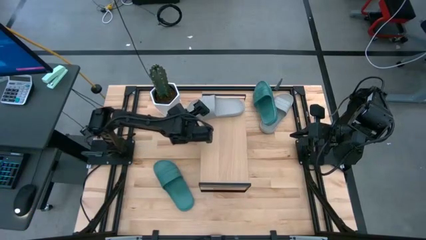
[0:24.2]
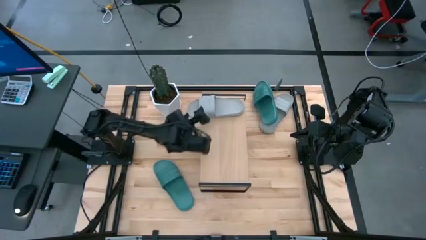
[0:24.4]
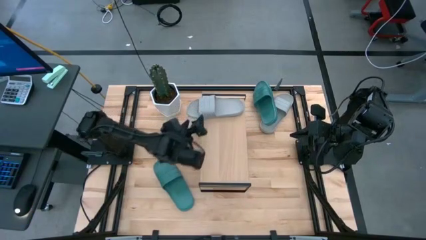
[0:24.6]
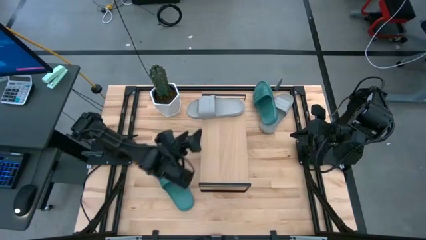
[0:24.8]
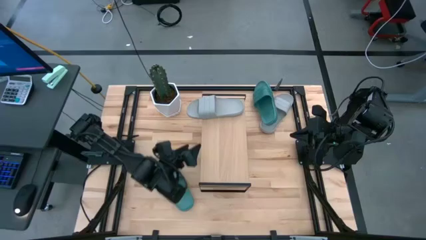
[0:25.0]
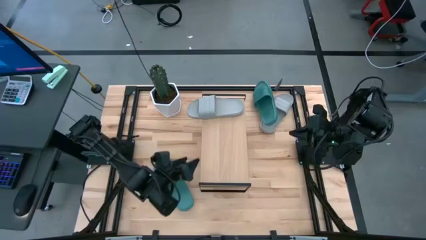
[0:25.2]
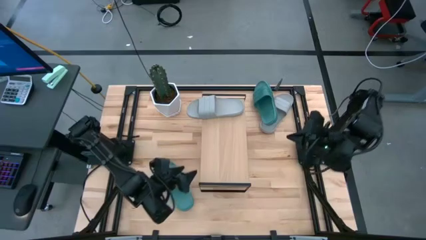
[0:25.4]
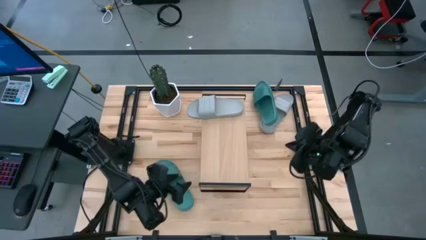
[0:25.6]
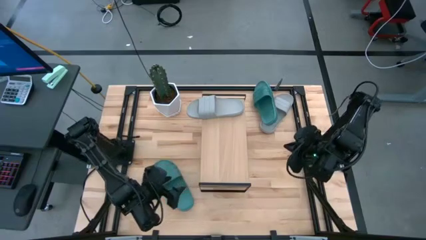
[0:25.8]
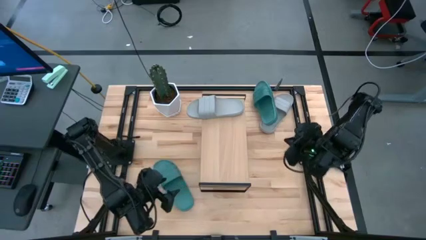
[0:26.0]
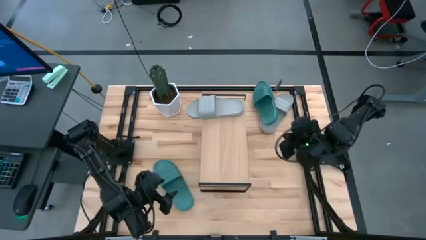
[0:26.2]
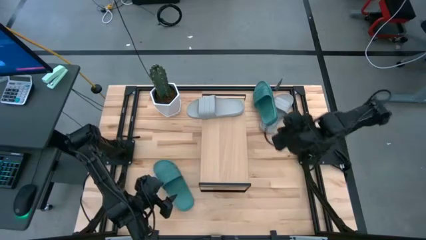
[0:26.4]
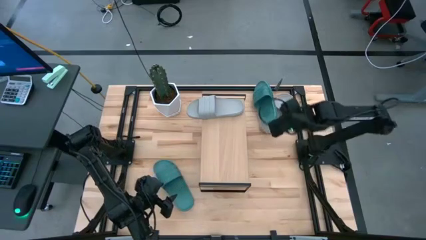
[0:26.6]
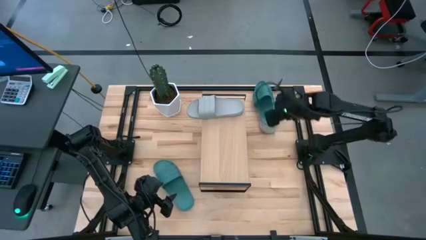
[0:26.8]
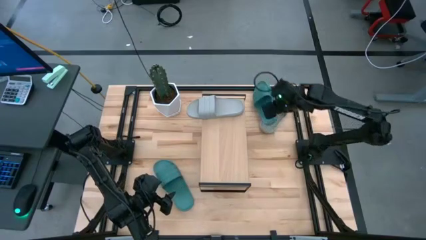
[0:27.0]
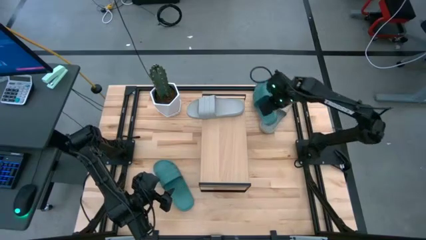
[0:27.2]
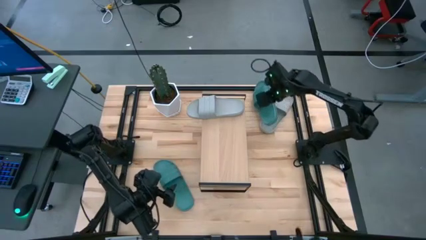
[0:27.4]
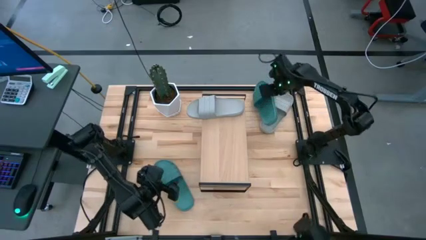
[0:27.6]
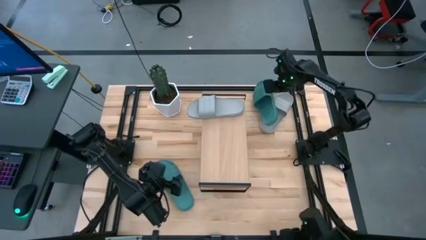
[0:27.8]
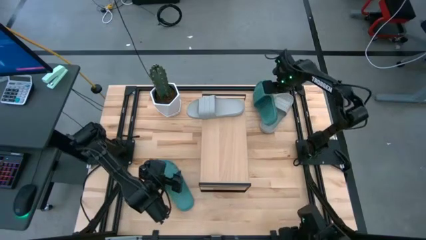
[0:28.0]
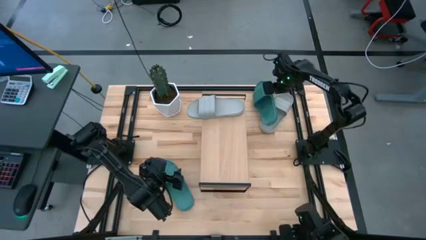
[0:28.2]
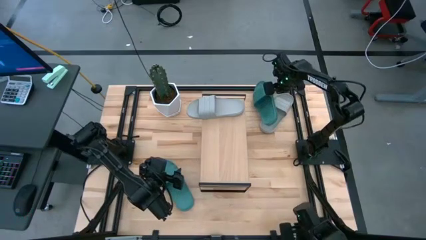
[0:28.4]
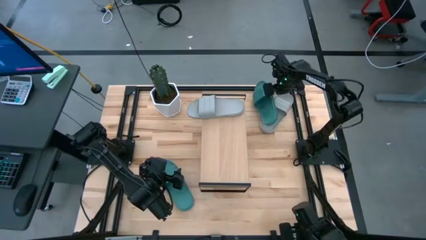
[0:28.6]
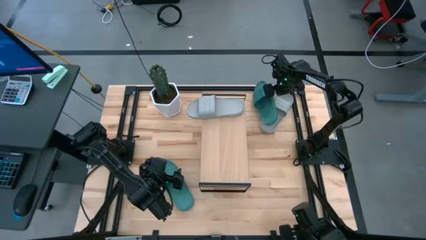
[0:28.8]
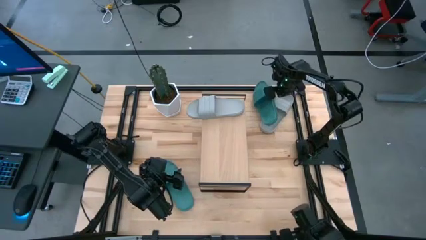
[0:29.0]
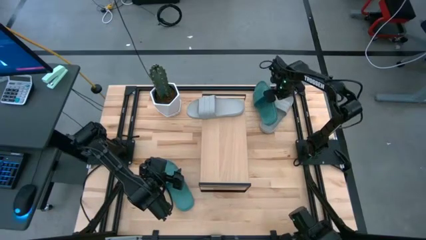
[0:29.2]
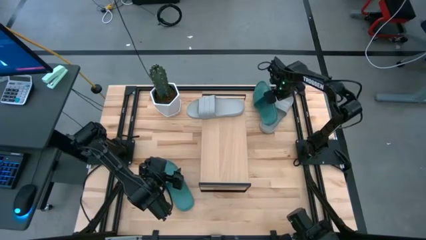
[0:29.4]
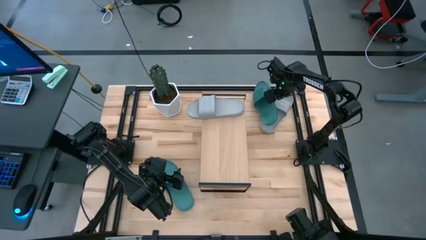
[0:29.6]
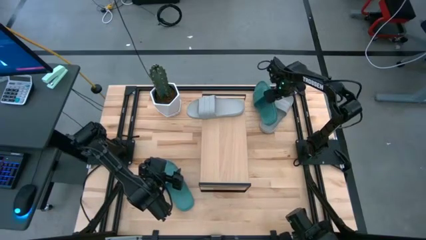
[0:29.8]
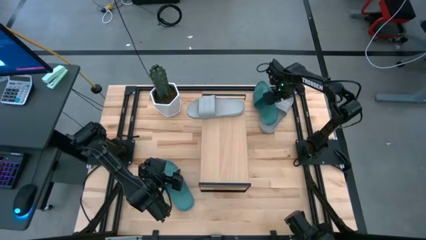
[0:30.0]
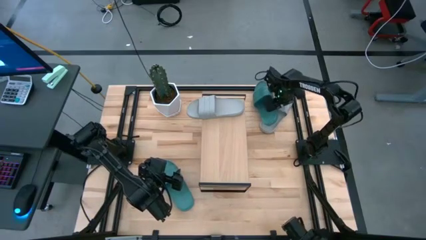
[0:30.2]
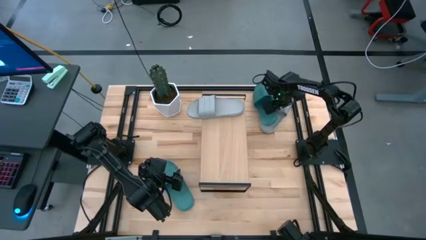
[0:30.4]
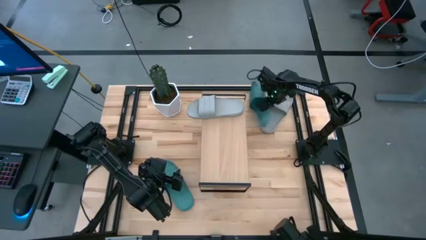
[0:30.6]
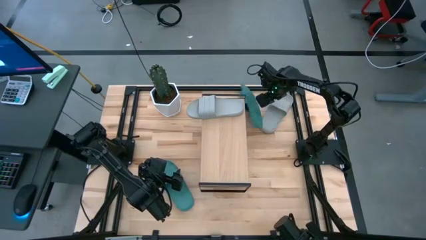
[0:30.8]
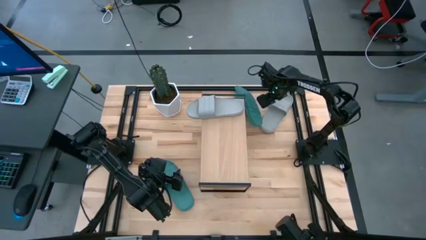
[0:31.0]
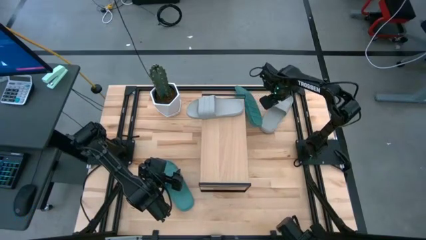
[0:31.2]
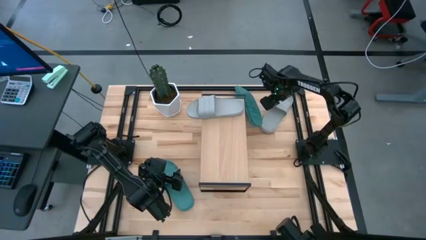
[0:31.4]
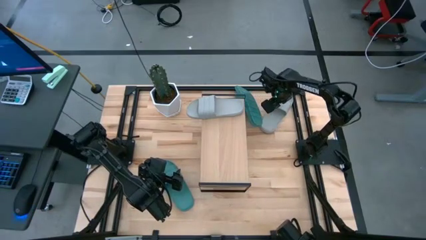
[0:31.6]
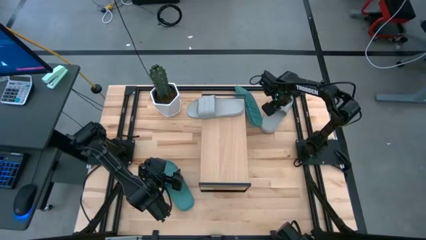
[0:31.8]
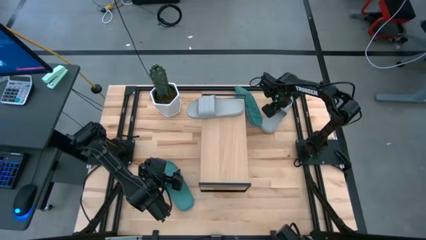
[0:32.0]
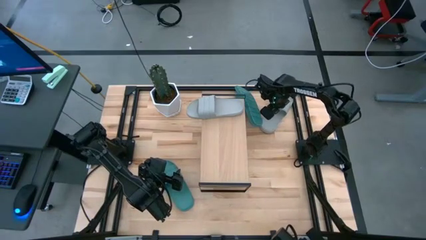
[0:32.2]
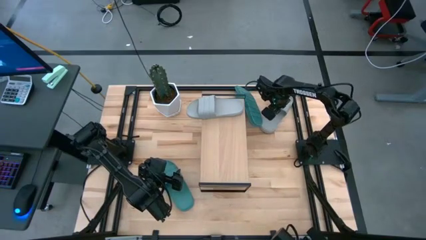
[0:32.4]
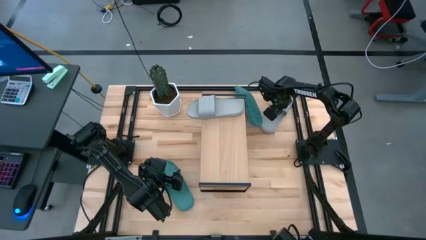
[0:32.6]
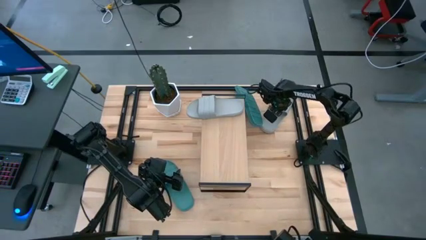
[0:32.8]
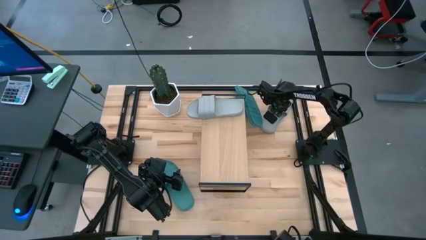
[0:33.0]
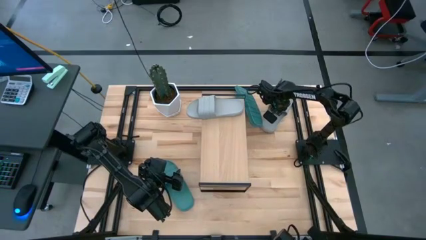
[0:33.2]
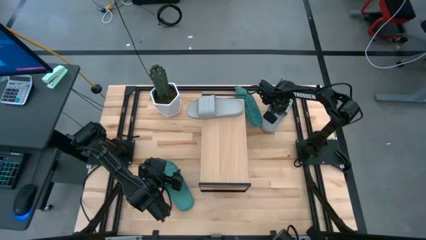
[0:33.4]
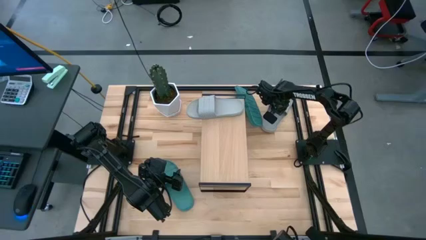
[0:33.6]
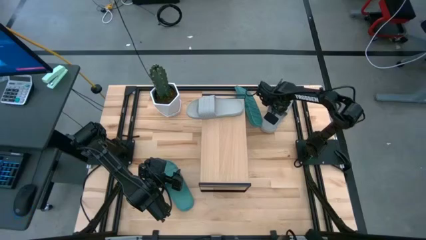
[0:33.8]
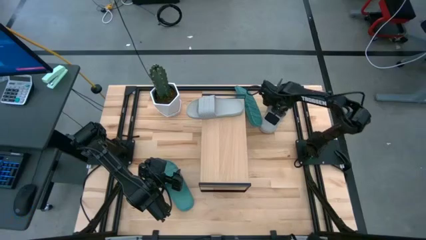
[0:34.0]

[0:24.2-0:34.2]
Task: Pick and place slides into the shelf
Put the gray slipper on the shelf

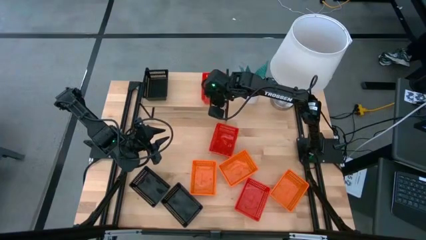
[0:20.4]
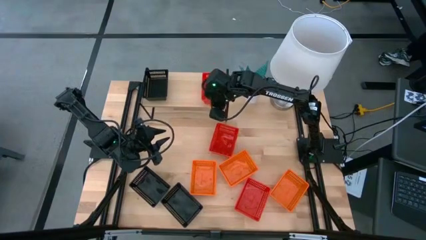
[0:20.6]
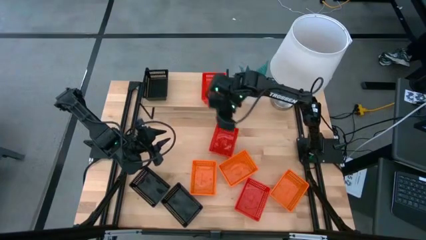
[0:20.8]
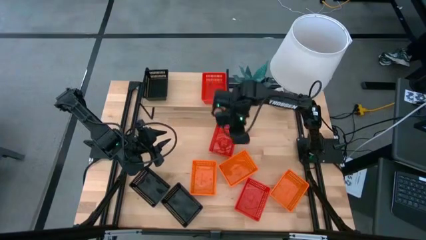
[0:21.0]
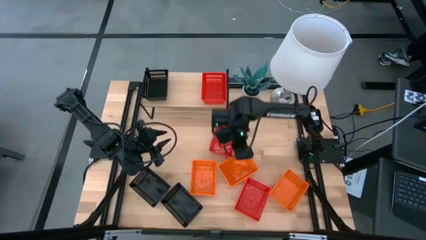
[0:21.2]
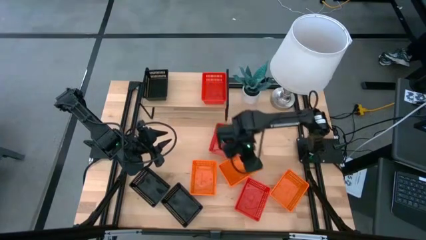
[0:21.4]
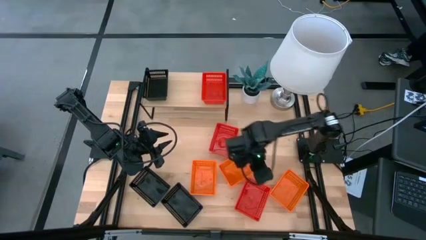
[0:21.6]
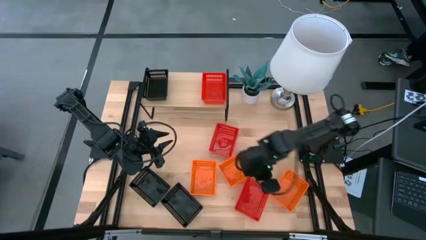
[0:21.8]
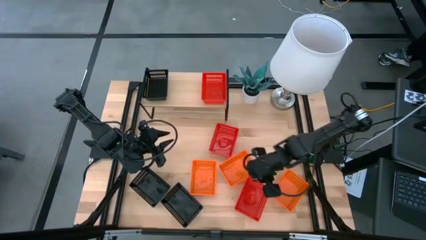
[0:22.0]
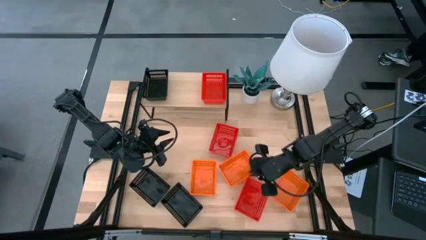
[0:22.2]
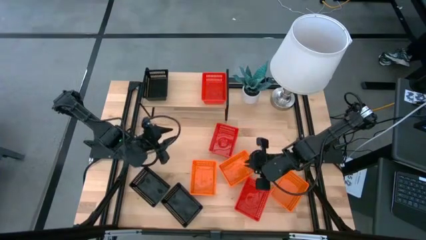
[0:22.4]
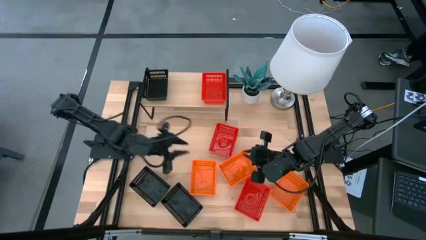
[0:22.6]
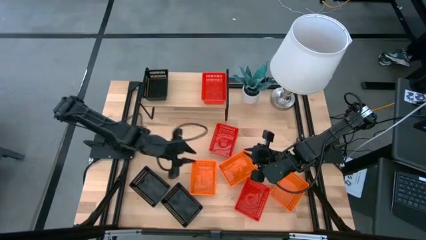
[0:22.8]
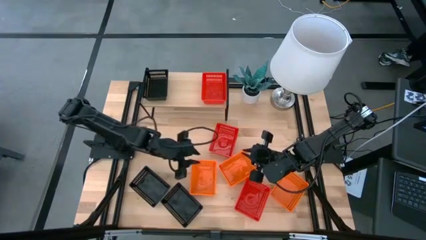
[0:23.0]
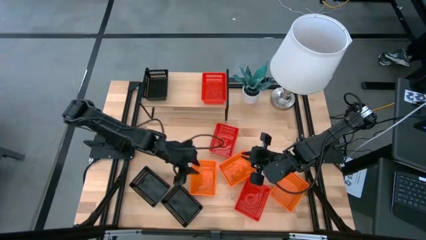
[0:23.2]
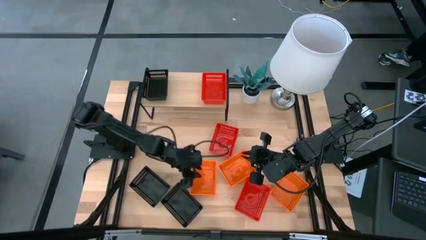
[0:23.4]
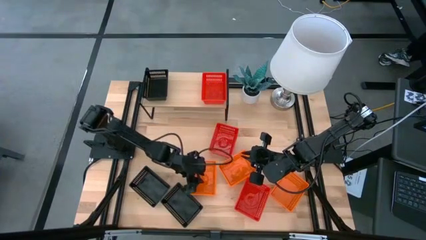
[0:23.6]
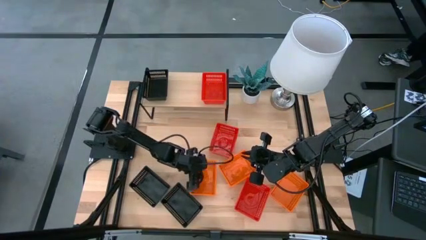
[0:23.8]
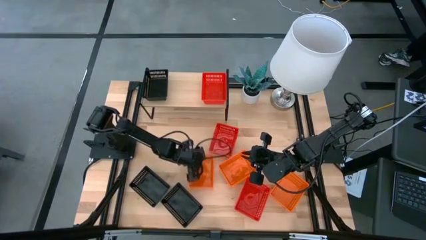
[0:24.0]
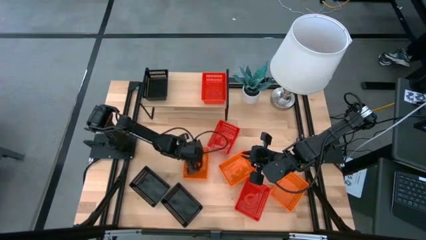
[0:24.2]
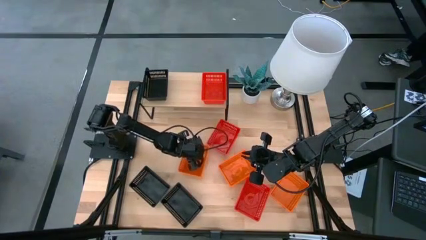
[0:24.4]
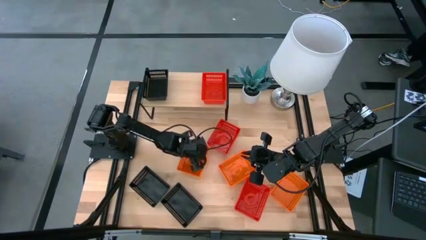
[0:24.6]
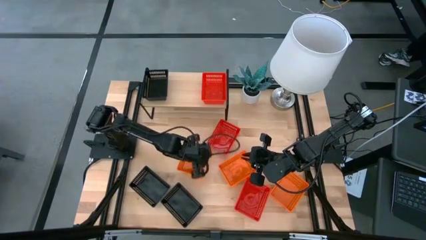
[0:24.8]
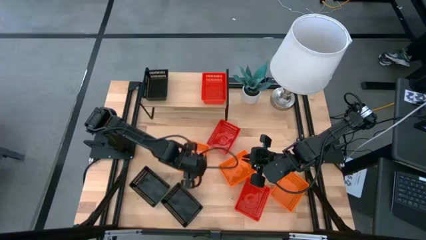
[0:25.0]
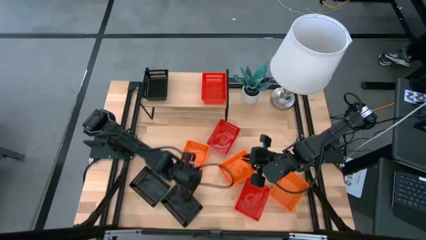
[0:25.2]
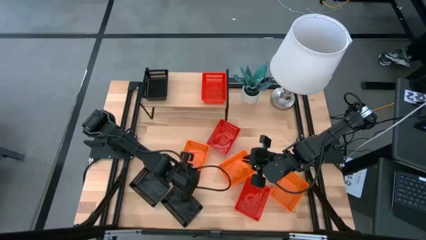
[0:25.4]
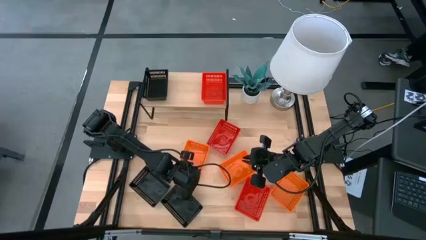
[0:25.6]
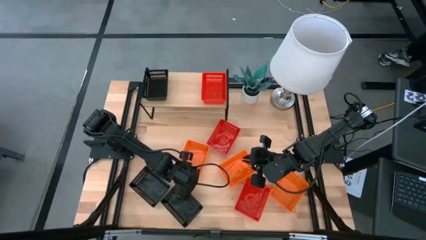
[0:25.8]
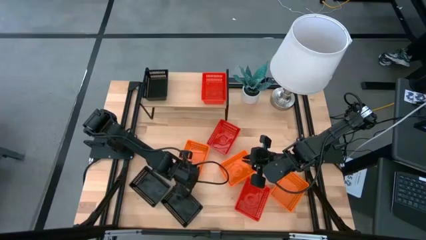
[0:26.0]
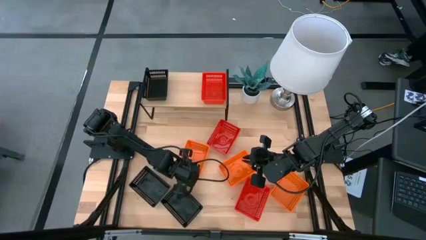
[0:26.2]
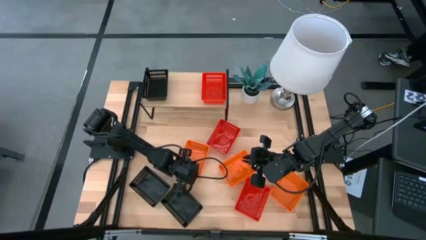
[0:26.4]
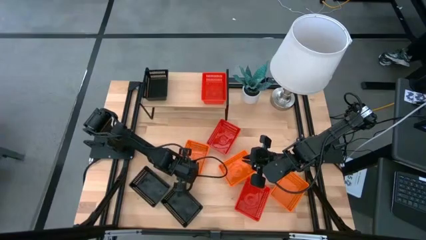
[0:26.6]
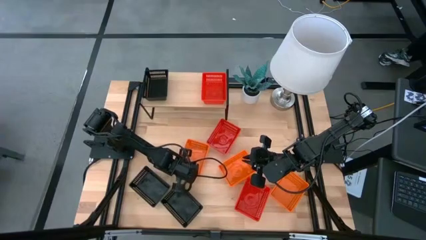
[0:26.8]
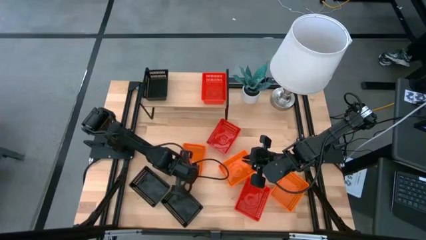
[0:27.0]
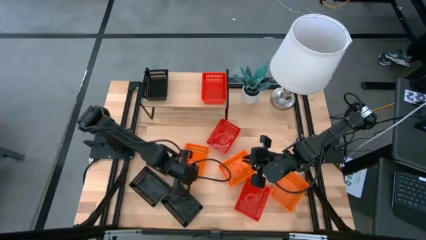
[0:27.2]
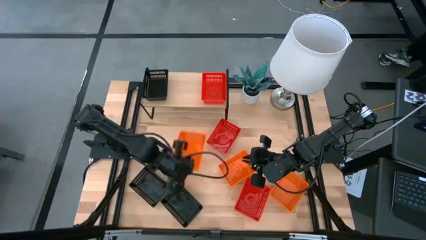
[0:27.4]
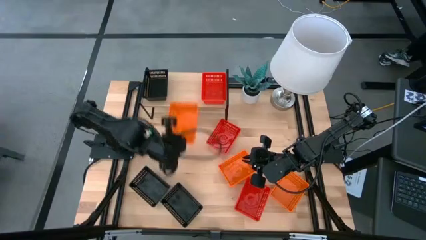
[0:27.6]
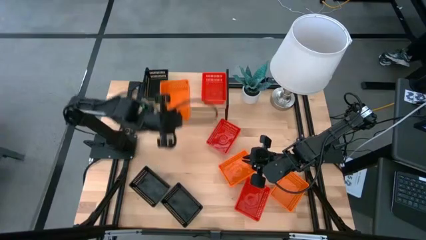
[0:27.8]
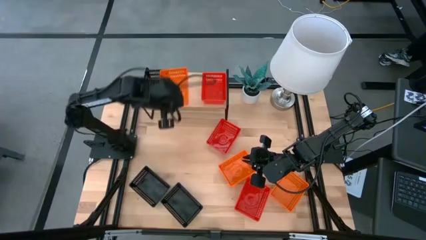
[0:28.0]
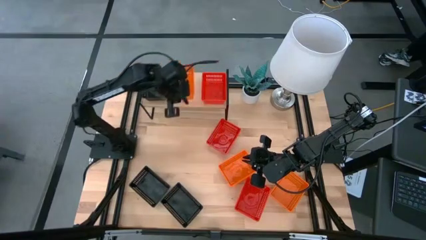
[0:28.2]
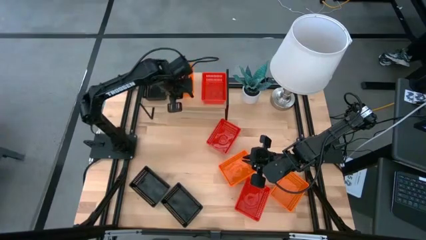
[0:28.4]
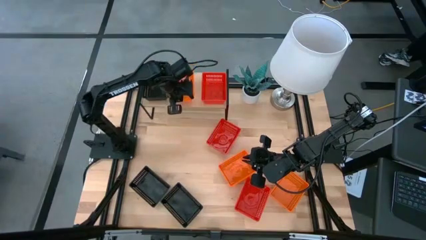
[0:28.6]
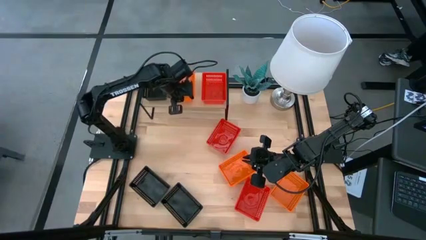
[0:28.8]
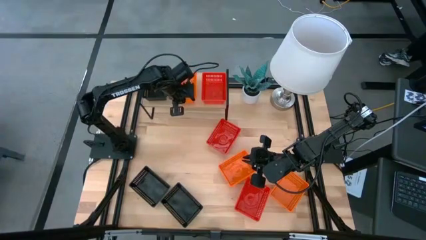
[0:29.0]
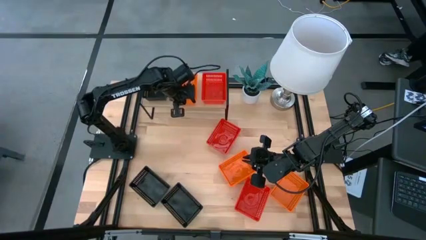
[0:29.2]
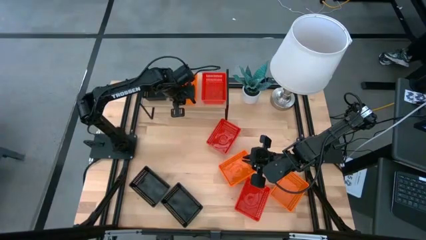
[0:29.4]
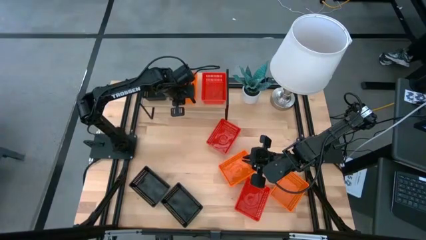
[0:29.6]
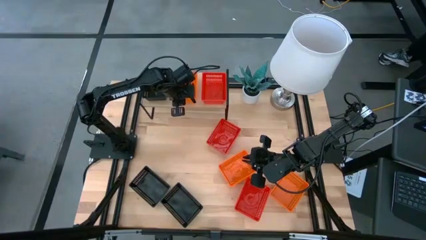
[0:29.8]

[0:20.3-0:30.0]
Task: Stack baskets on shelf by color
Put the left orange bin on the shelf
